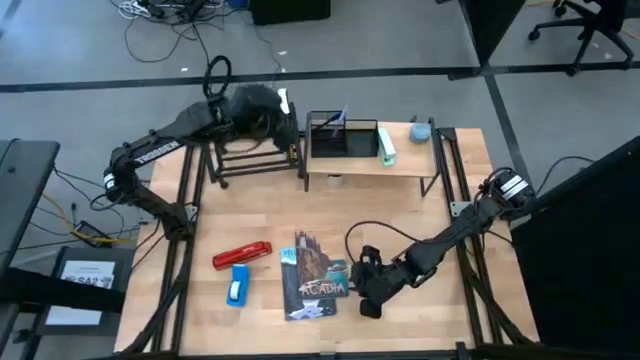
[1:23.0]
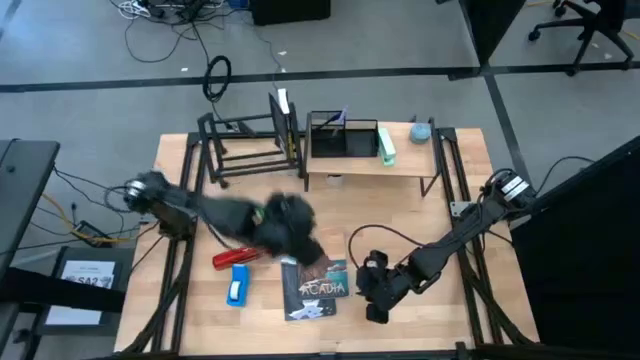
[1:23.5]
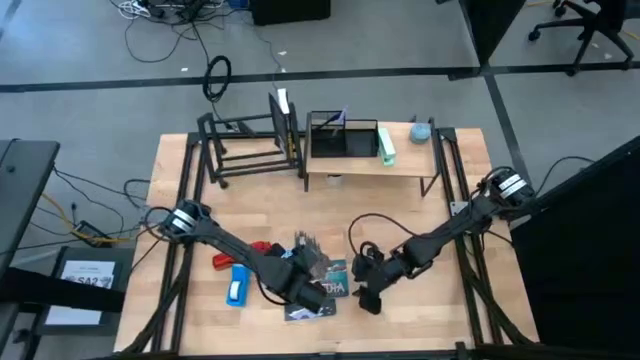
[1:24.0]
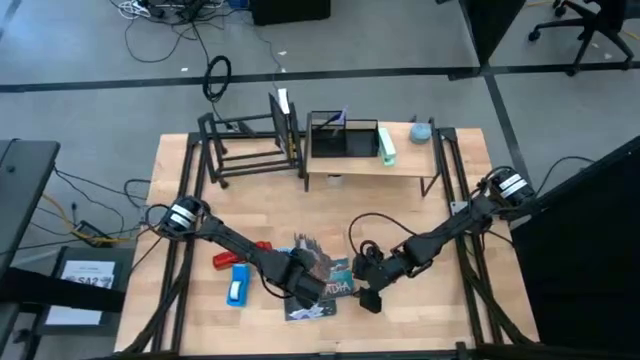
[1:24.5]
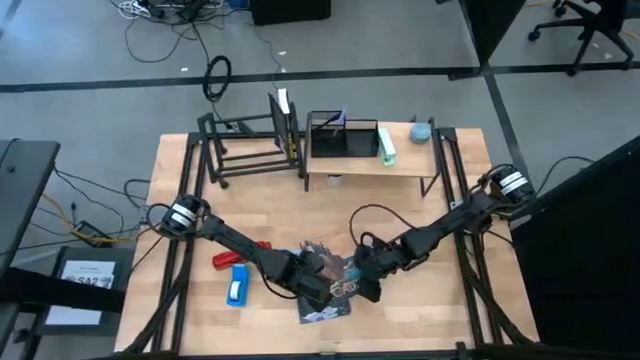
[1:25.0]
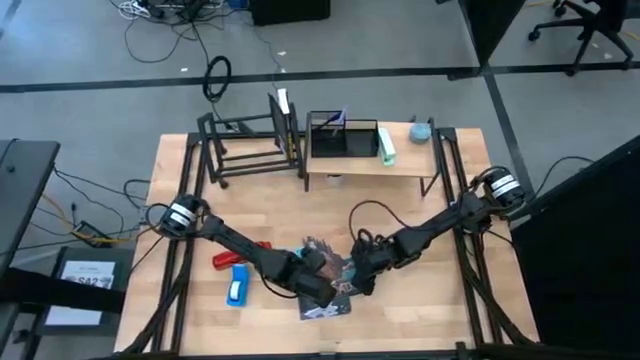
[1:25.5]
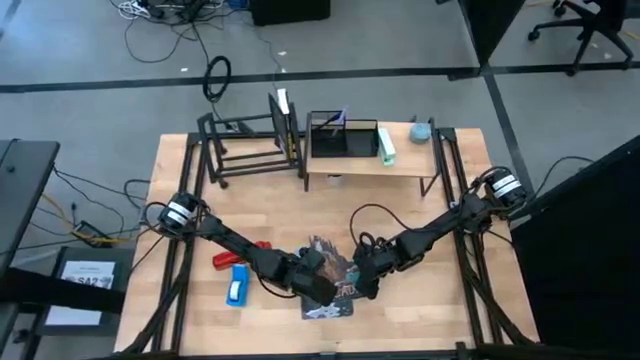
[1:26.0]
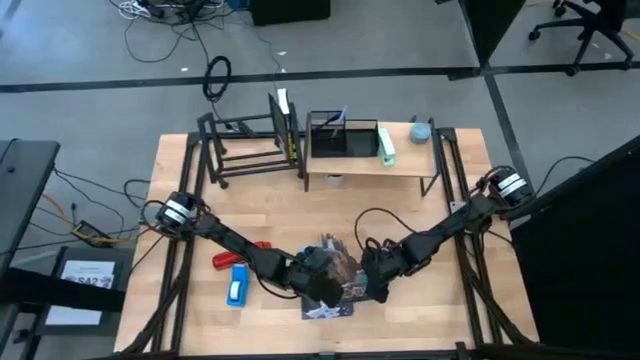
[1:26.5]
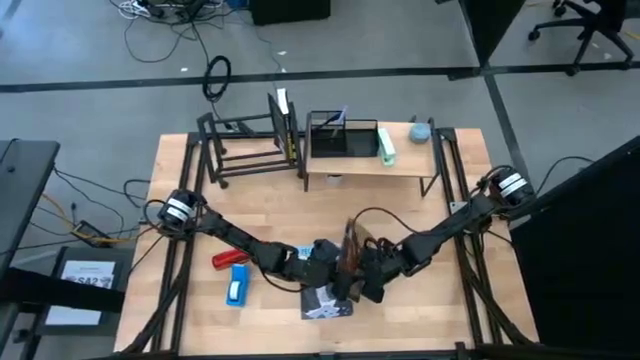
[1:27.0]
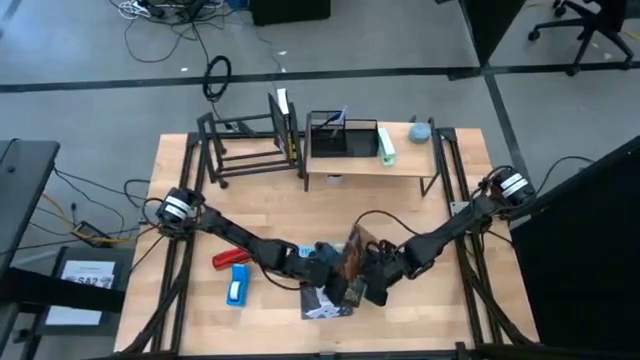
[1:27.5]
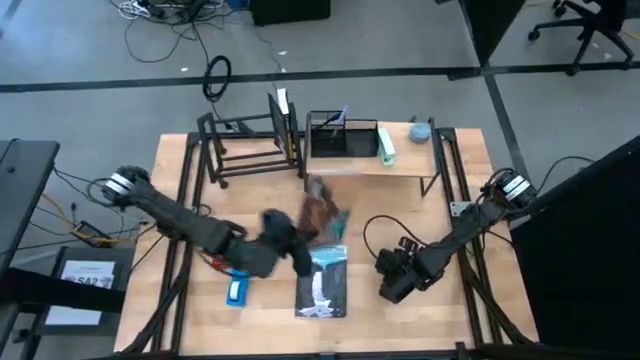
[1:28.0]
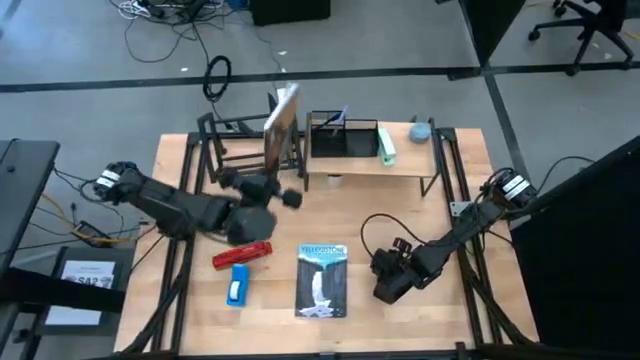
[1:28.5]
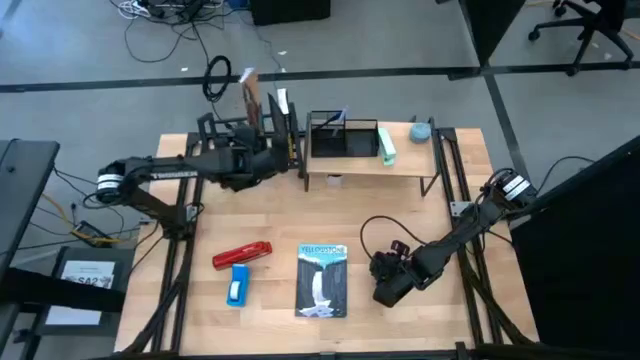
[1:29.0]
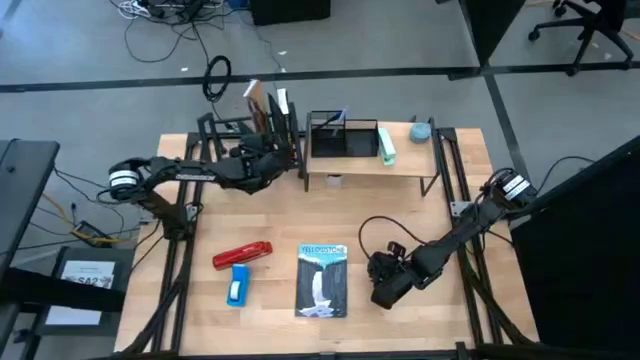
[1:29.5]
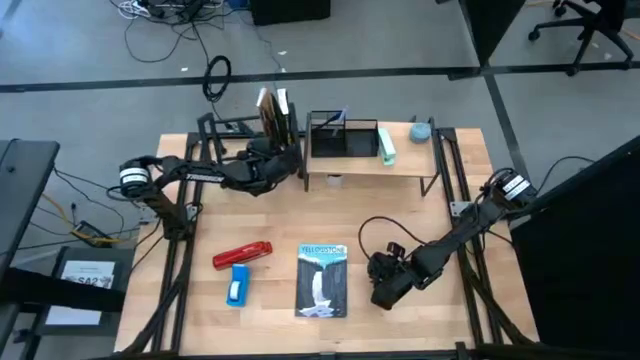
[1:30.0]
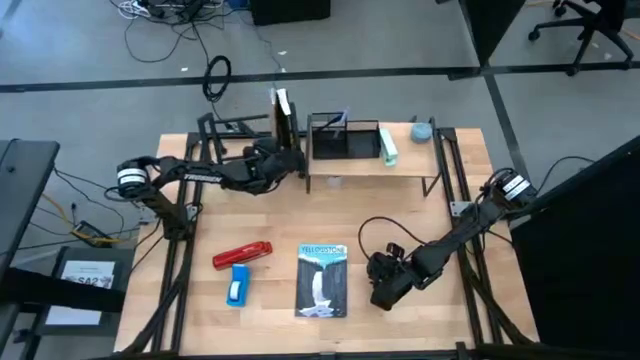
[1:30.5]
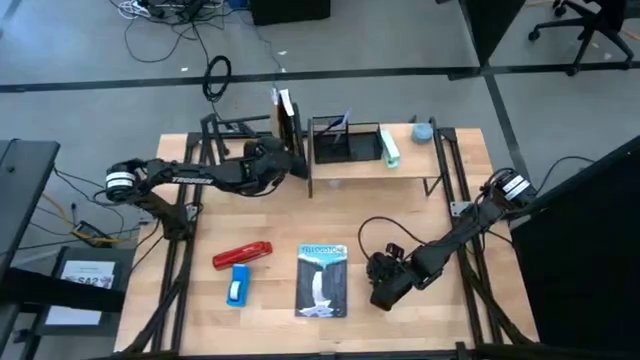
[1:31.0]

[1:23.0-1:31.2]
Task: Stock shelves
Put the brown book on the black bookshelf

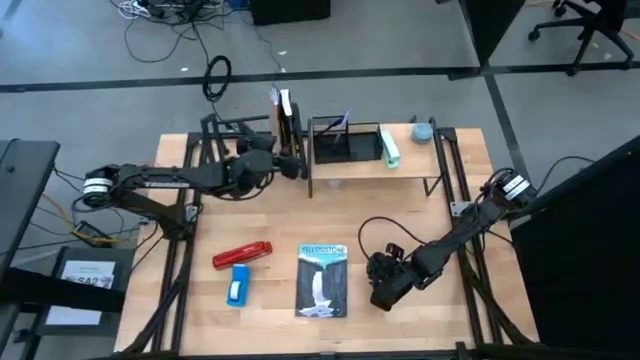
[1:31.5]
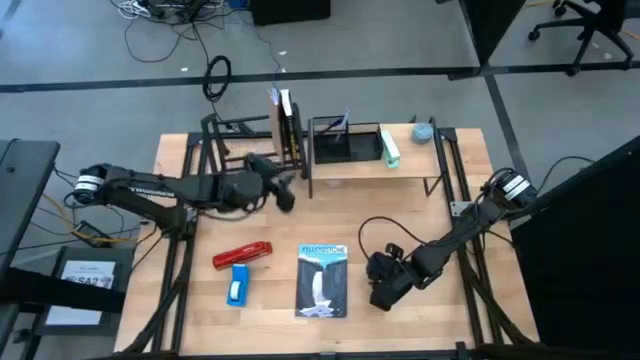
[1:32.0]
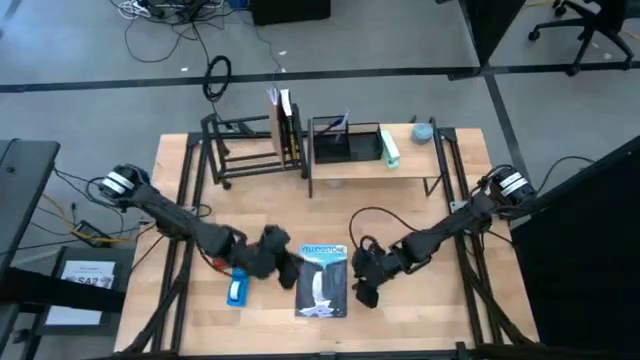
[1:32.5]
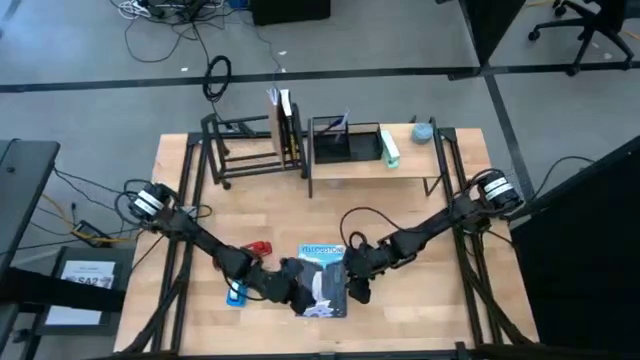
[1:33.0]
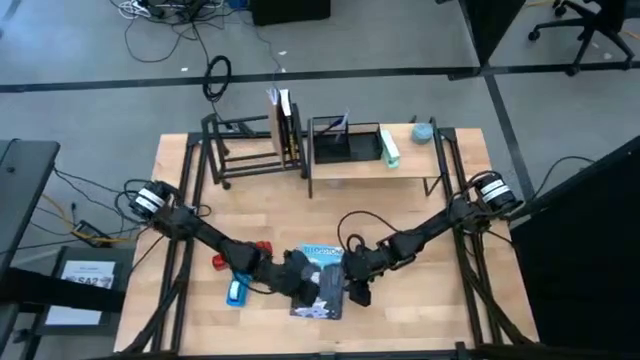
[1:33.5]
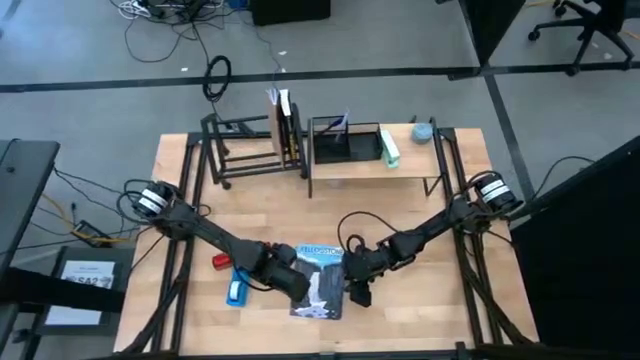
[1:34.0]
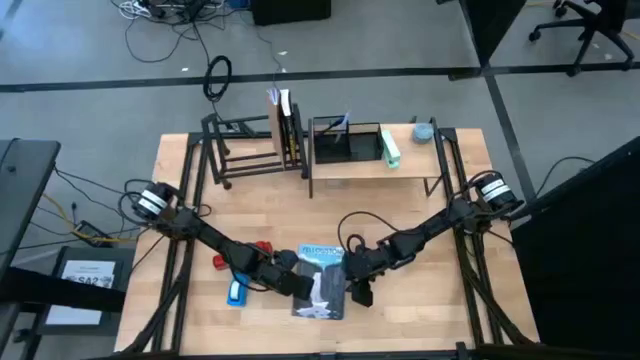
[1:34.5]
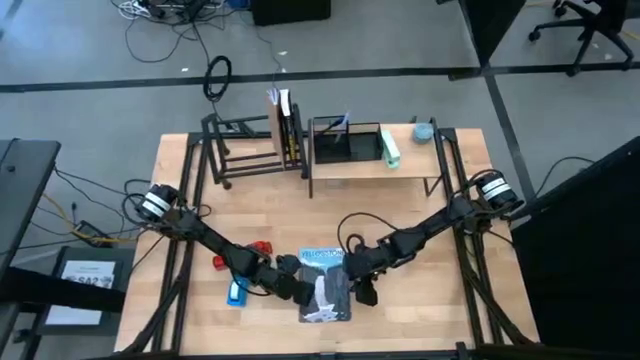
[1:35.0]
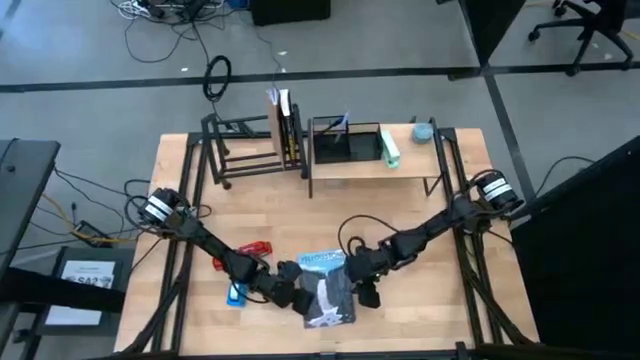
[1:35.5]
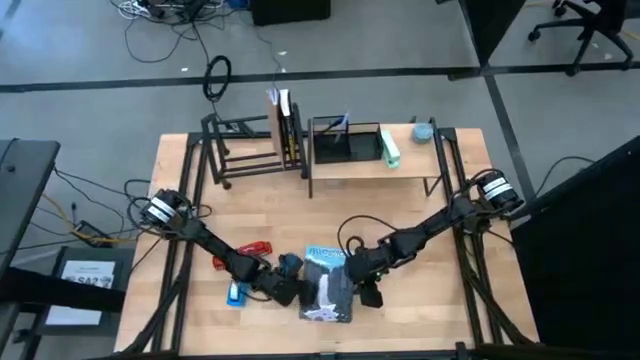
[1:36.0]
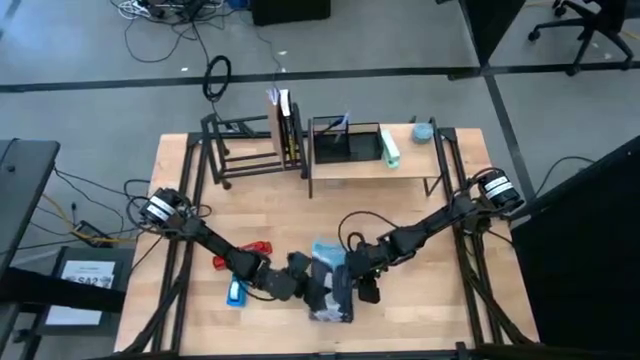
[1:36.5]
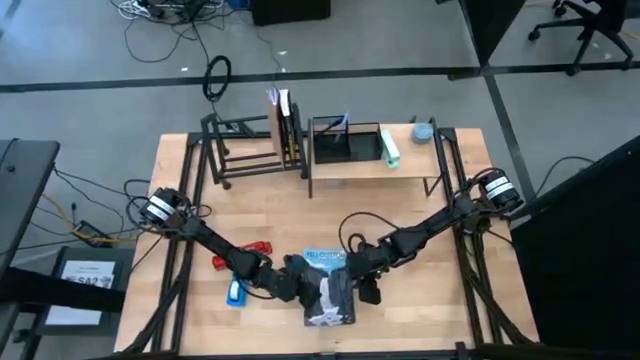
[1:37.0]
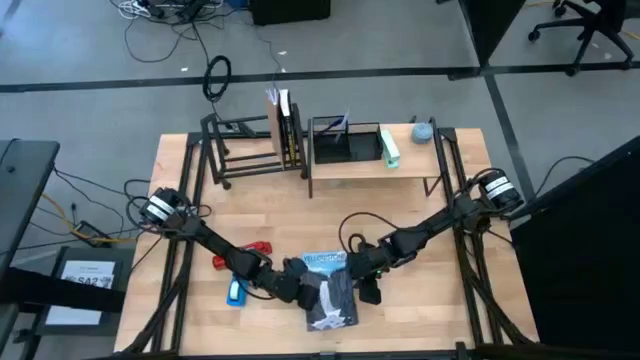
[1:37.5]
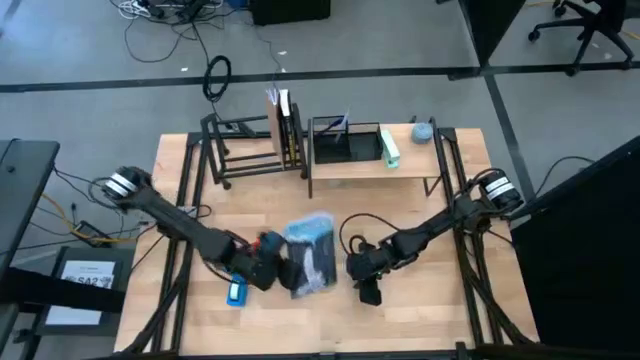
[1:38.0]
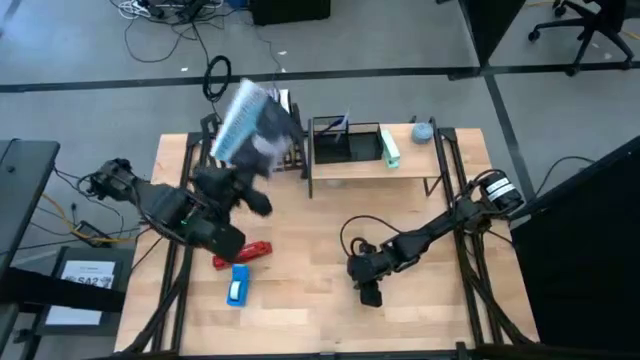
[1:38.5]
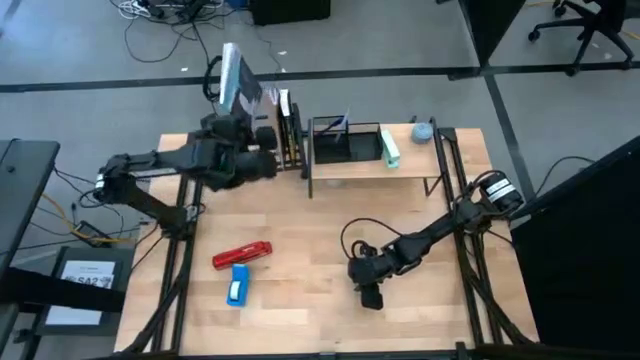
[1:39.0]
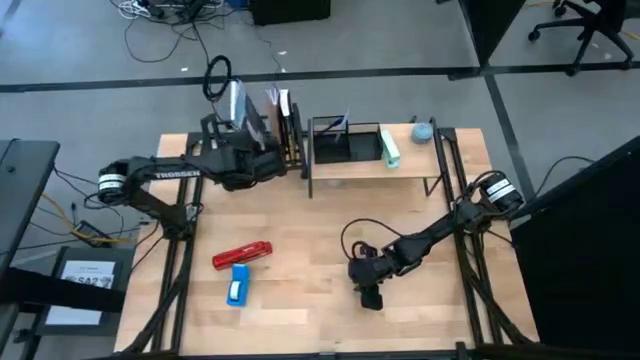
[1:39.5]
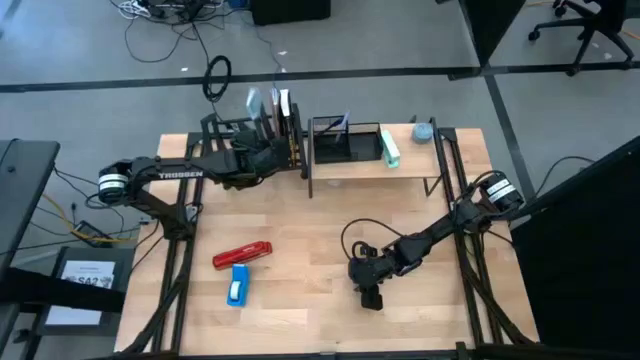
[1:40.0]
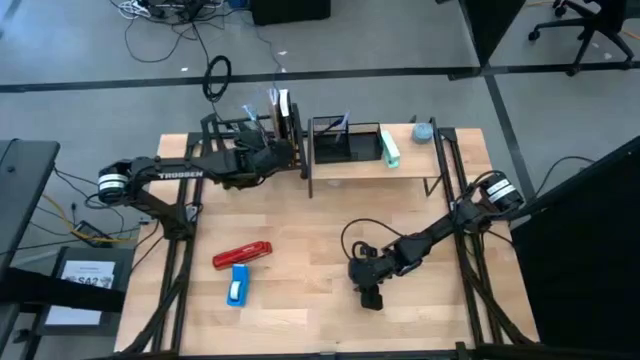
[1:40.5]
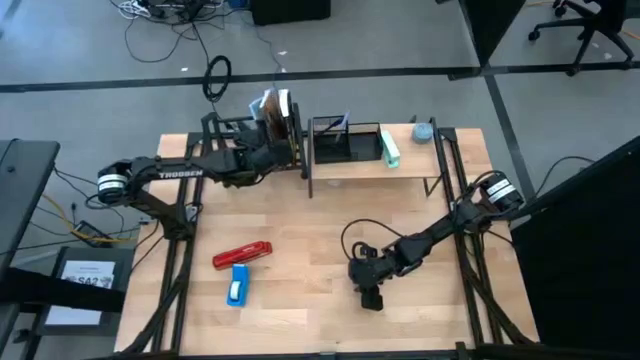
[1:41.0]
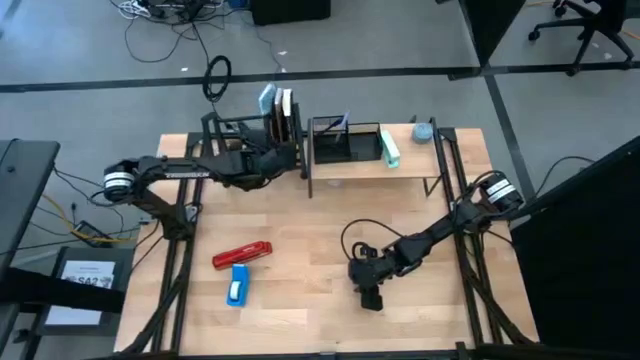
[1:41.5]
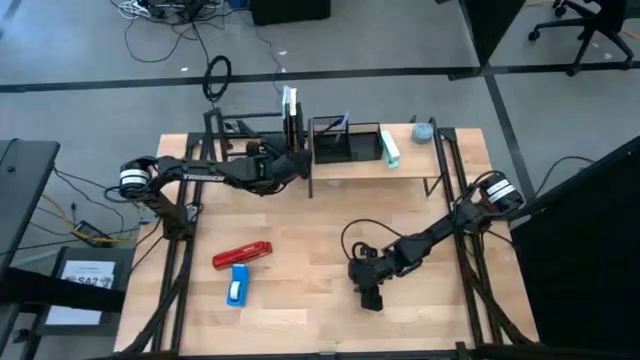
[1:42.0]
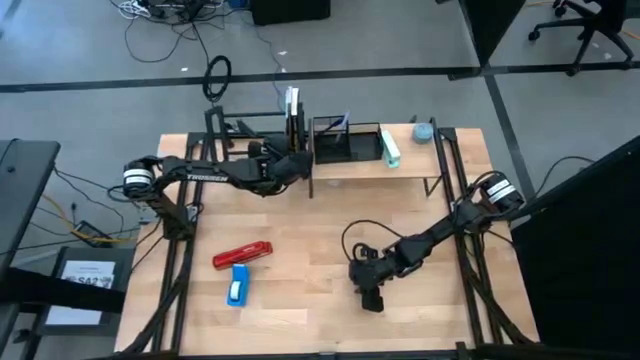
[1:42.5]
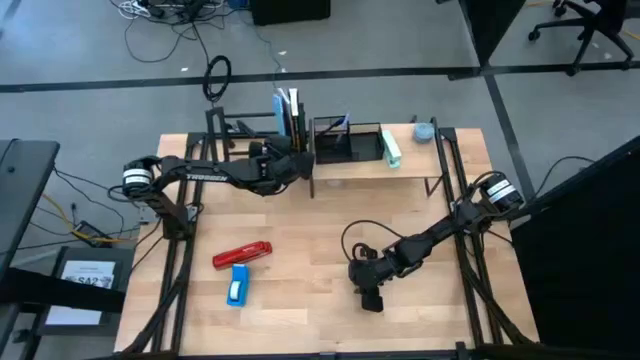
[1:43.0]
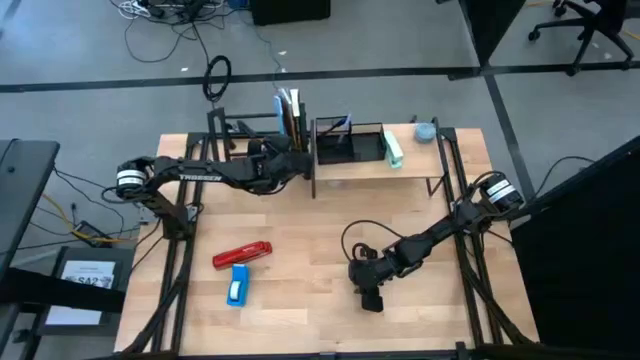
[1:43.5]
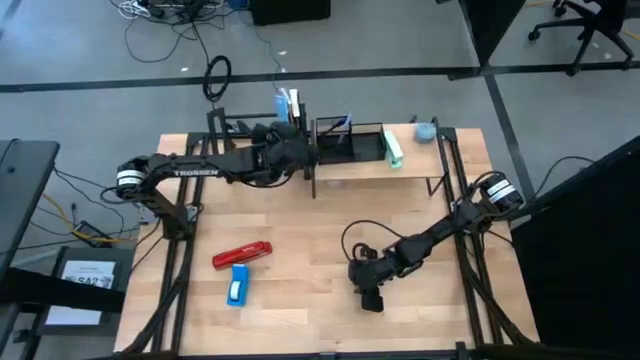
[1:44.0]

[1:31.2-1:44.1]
Put the blue book on the black bookshelf
